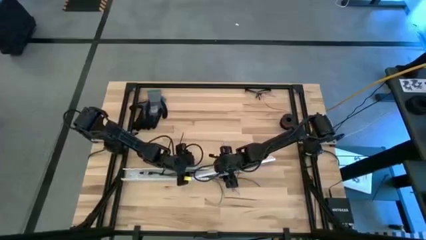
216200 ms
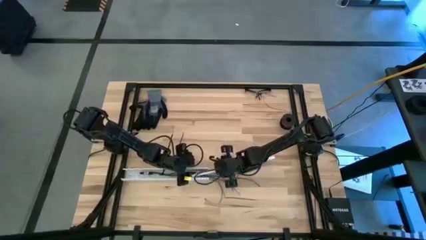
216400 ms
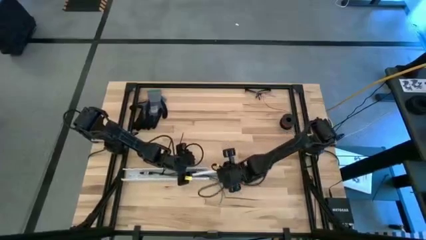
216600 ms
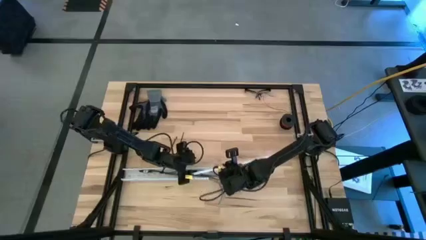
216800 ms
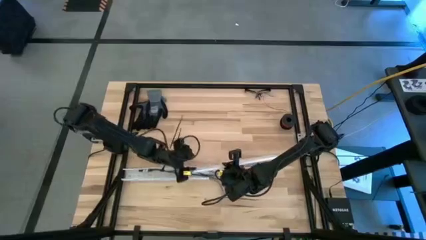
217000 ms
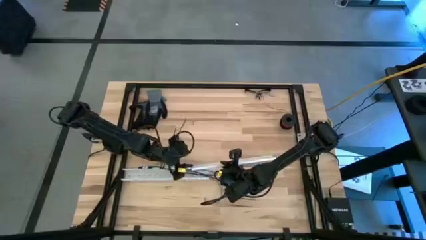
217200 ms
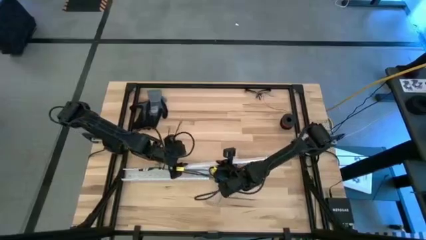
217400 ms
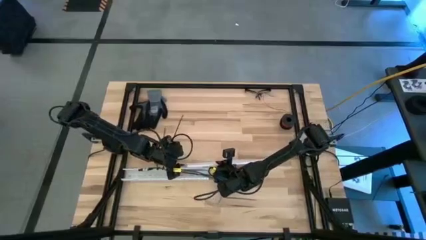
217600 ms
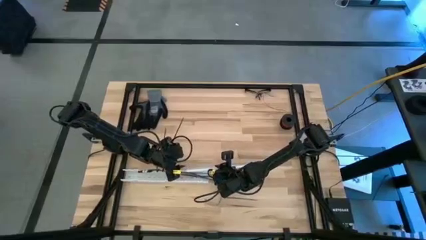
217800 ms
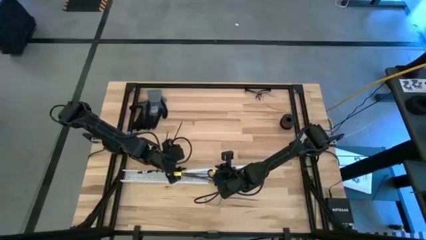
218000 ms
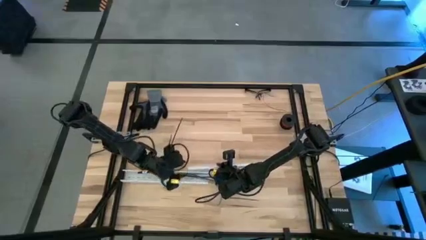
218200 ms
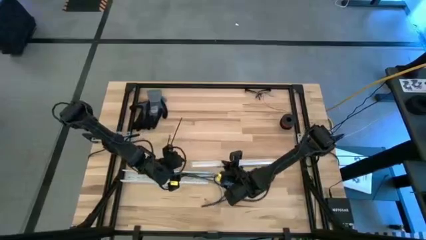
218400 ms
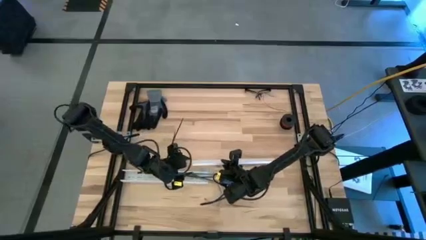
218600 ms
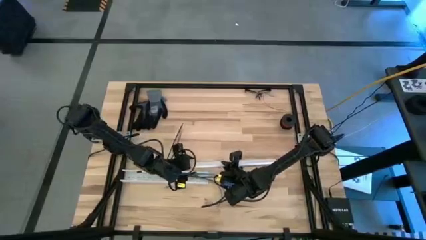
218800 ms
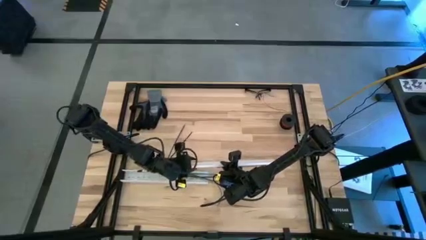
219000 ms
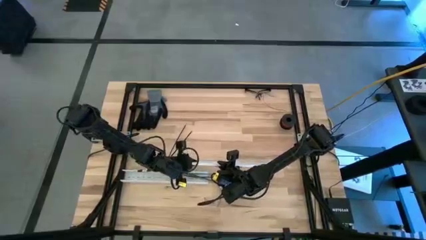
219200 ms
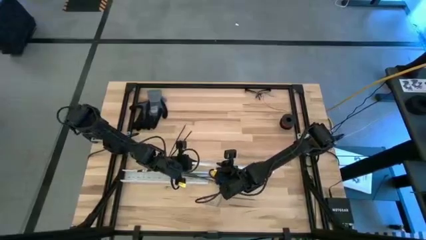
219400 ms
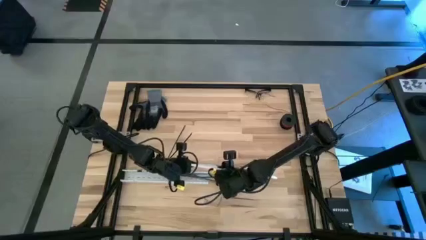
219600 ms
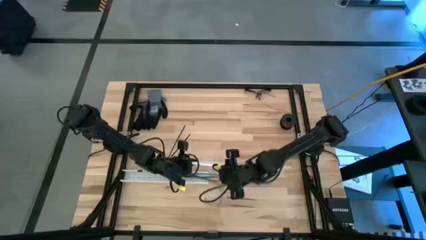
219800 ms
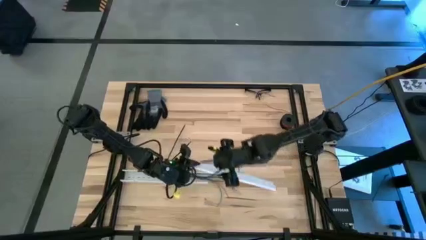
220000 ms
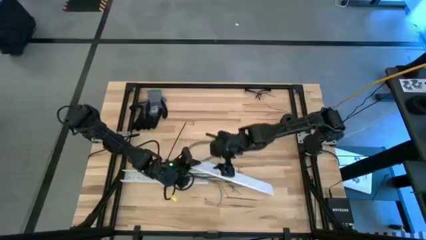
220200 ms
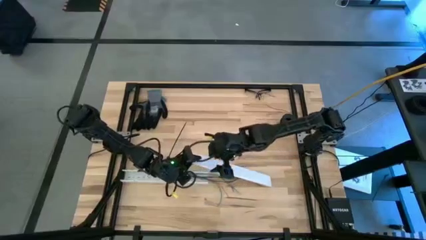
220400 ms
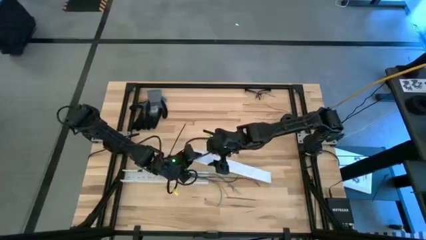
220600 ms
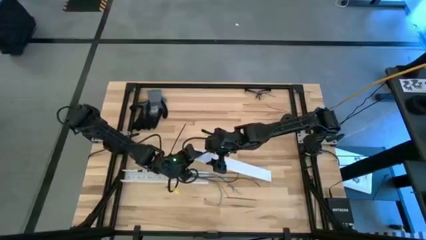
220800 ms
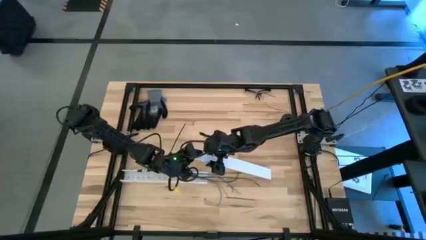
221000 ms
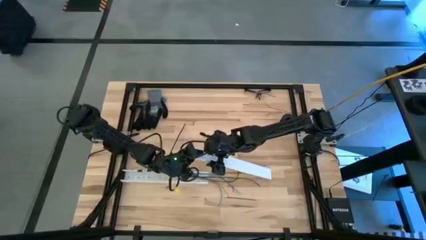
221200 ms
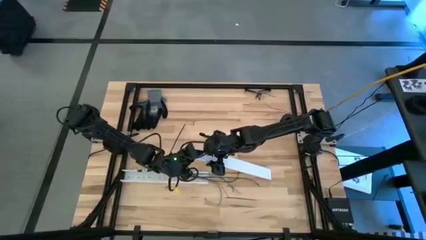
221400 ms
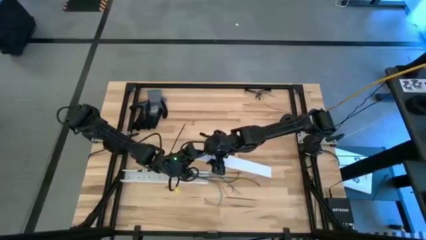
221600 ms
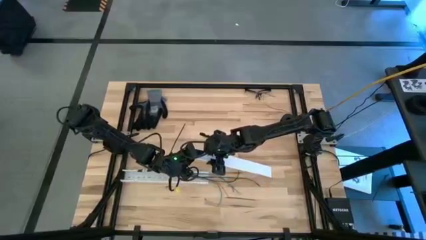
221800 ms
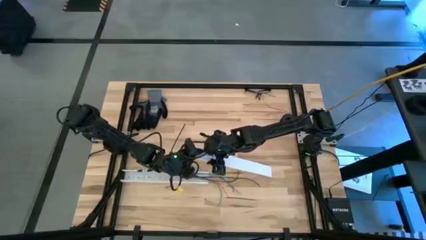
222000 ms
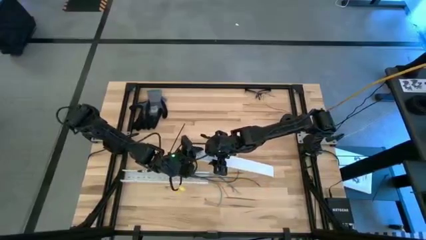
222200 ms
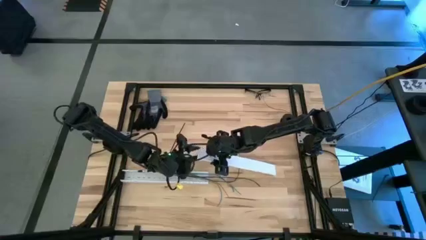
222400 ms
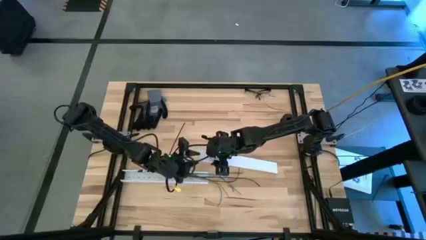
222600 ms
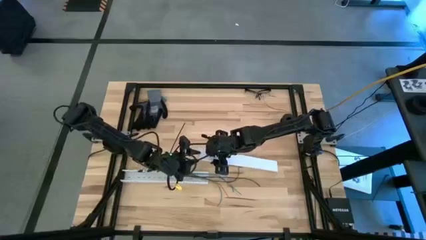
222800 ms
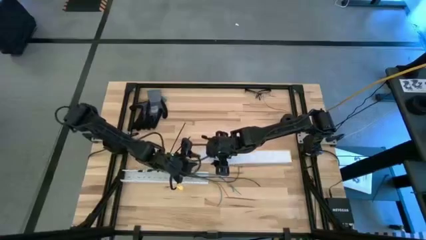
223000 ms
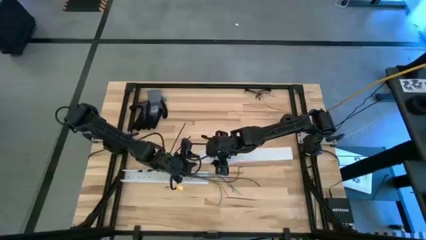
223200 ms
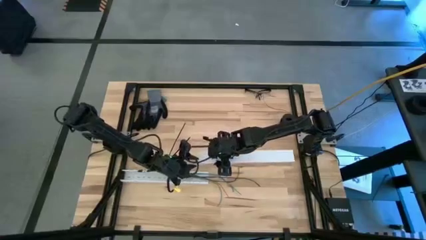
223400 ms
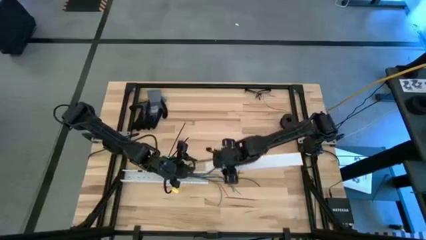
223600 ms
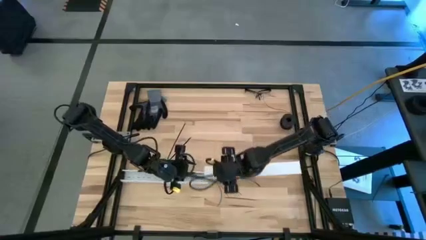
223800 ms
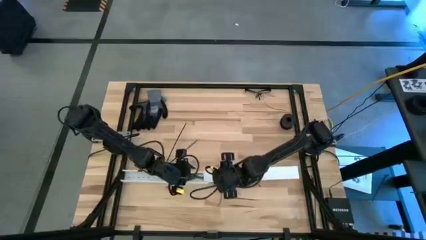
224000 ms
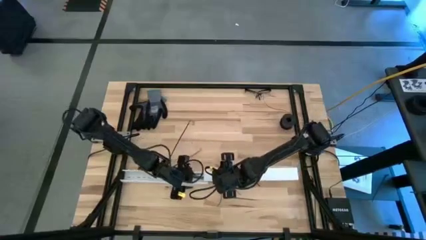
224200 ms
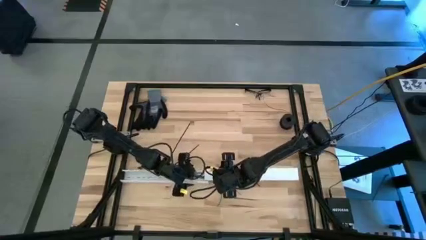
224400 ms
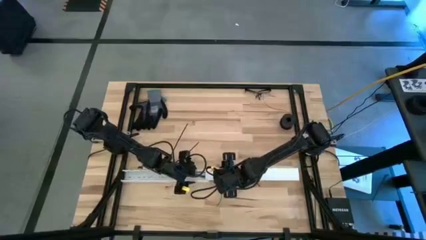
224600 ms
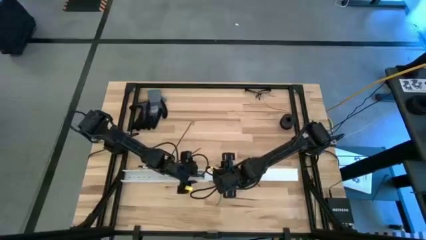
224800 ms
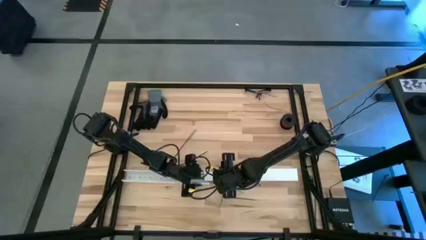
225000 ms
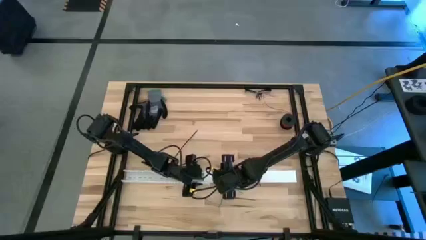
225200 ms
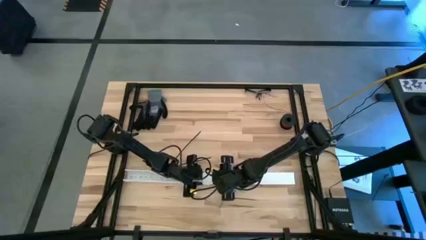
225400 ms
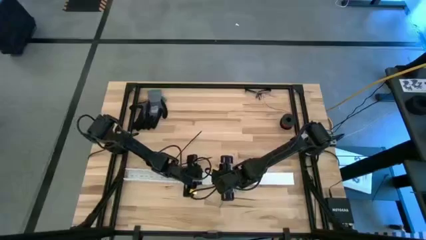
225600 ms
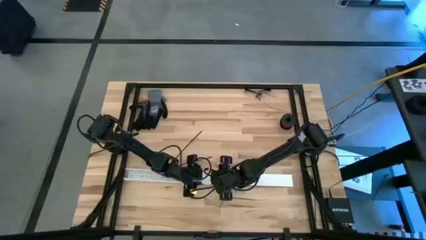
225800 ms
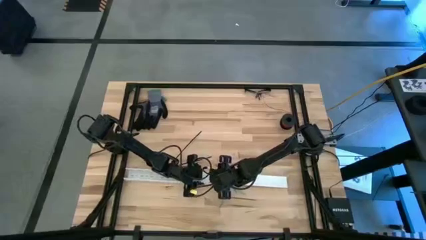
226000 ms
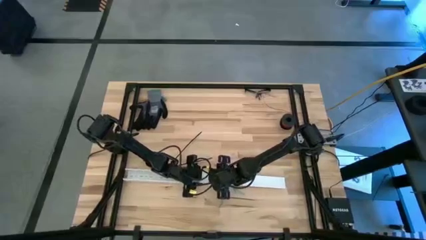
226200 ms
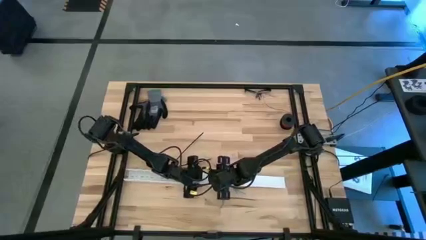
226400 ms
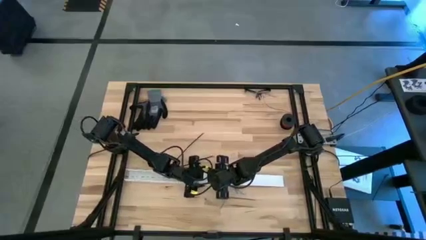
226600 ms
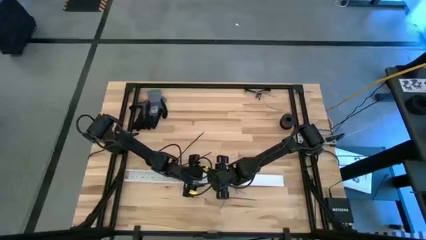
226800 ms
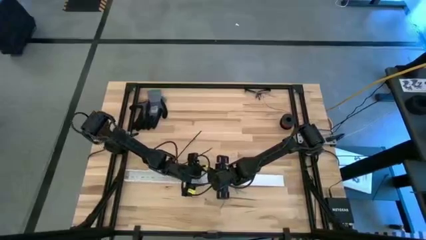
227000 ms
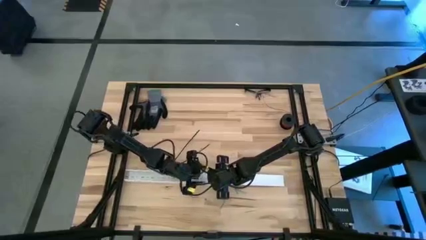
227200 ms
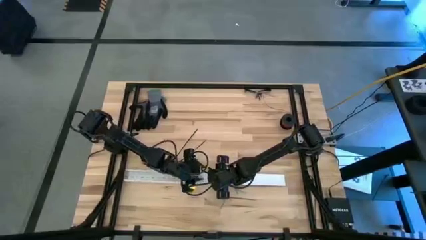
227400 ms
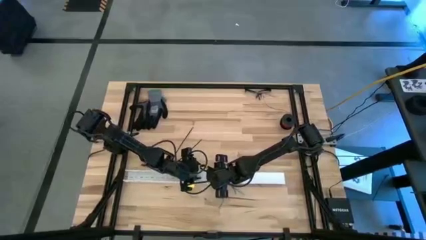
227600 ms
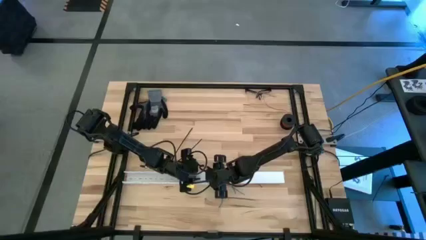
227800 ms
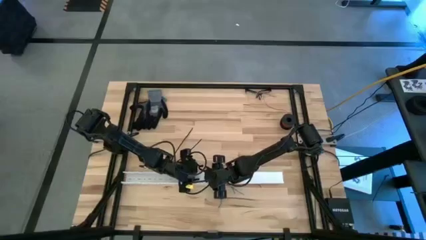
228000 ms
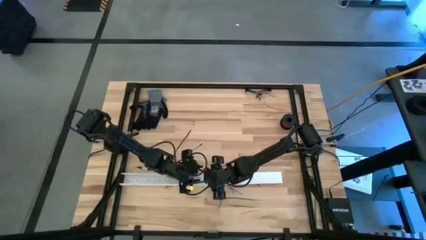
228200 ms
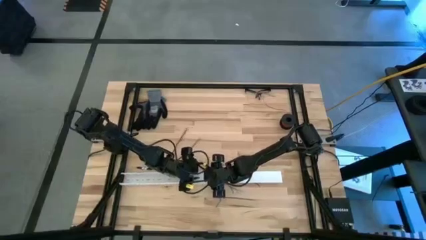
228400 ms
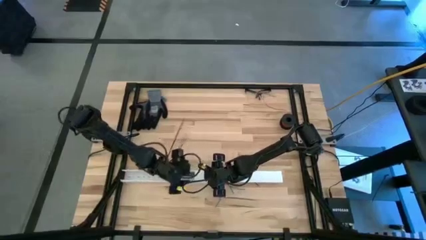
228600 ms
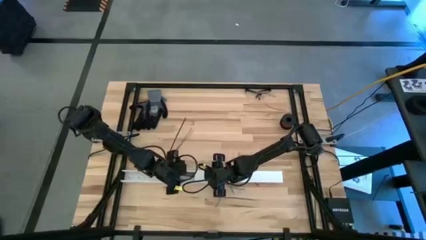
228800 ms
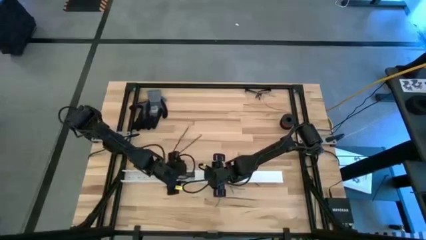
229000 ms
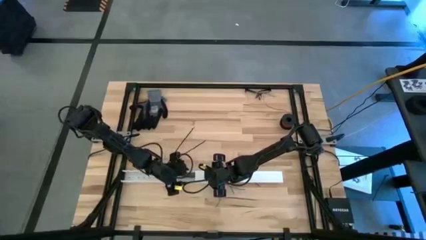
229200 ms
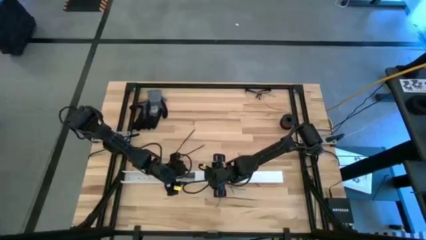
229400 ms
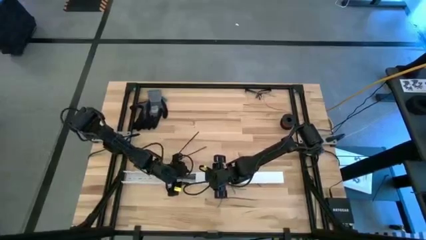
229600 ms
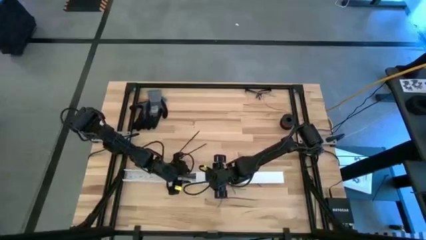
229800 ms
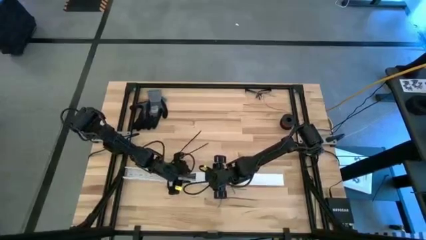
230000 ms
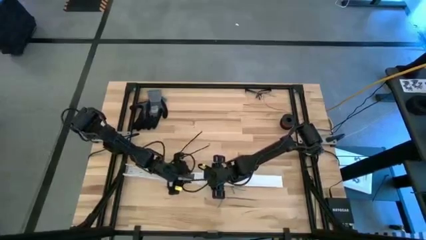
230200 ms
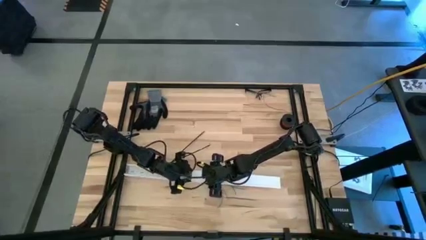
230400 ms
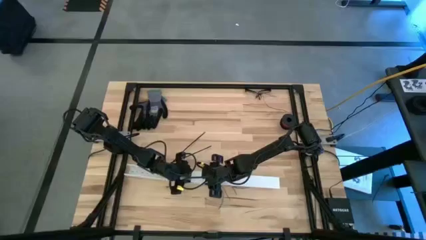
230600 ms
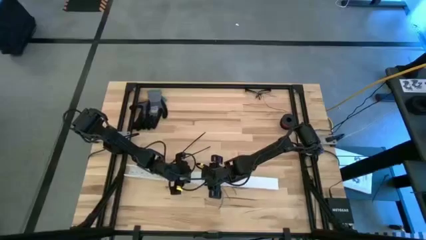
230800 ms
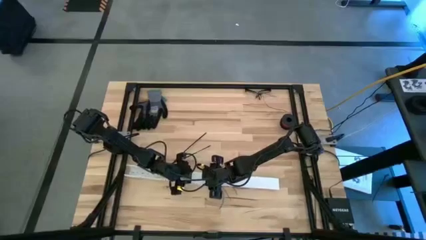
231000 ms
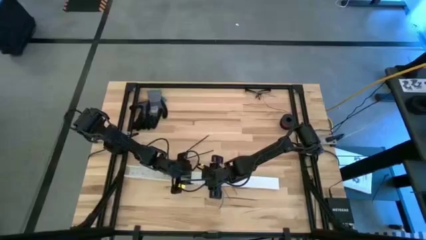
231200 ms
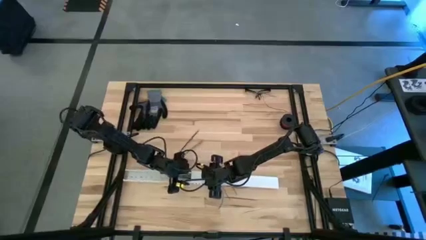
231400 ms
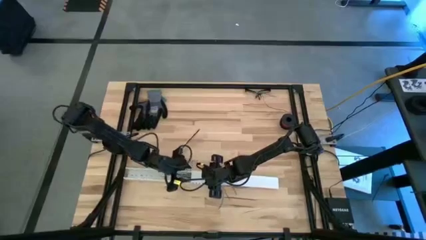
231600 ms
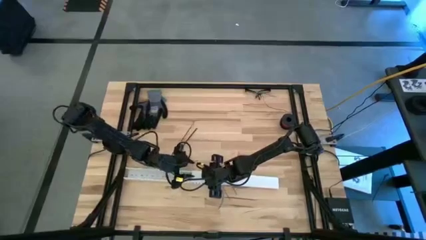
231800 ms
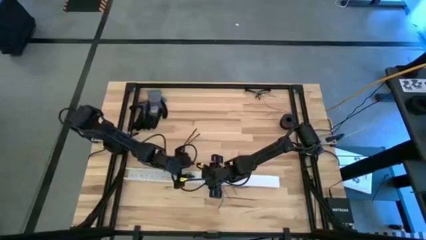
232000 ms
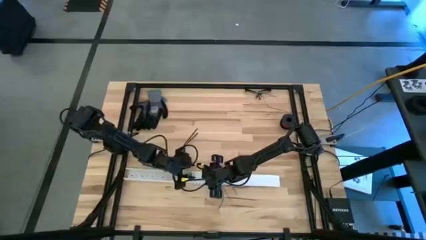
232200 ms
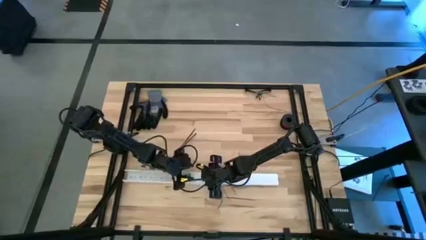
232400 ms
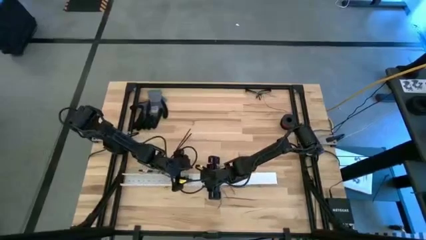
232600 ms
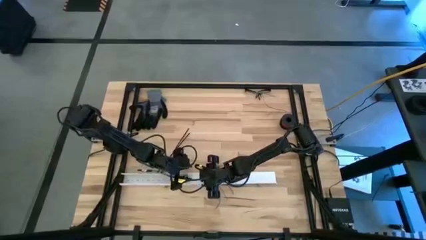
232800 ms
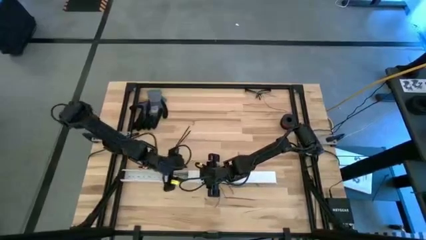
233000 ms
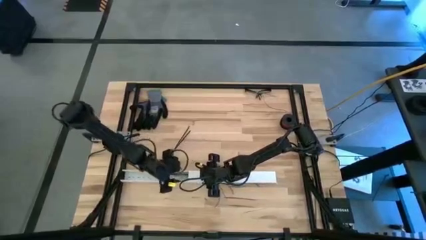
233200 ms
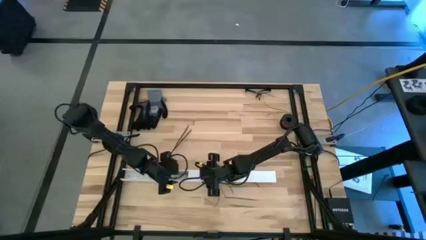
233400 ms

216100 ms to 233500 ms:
Task: Ziptie cables
Close the white cable duct
